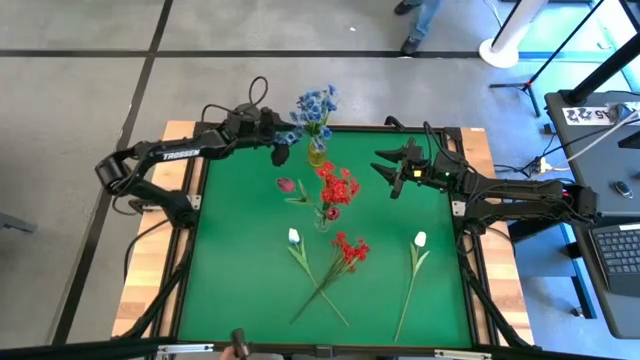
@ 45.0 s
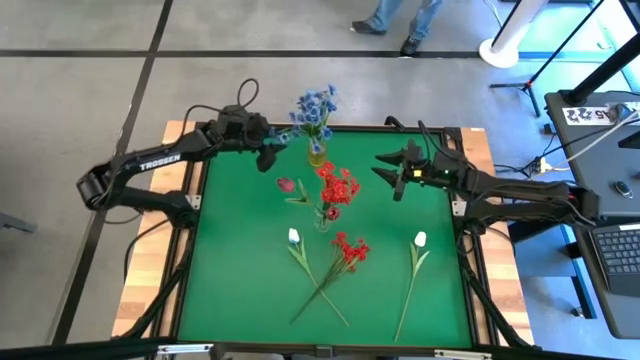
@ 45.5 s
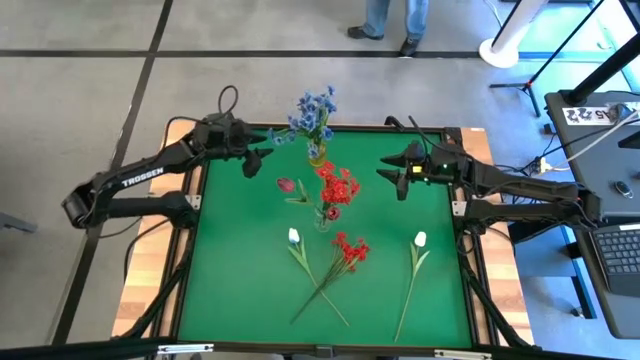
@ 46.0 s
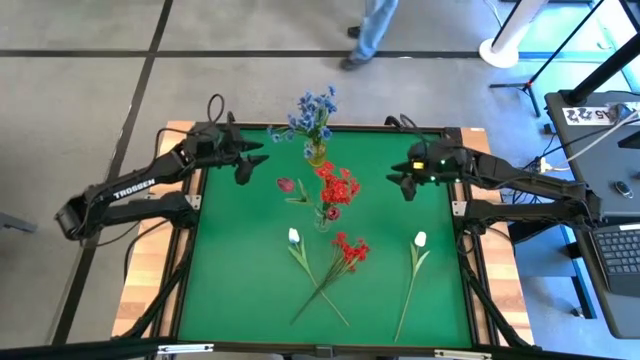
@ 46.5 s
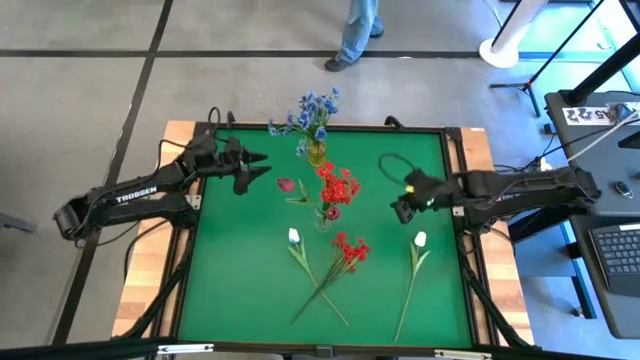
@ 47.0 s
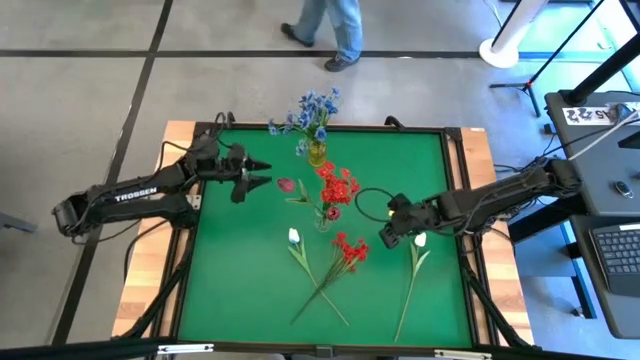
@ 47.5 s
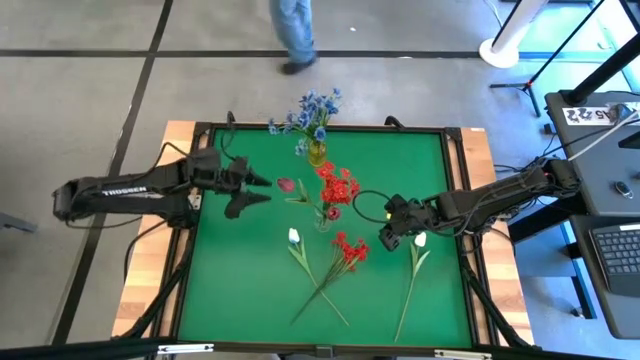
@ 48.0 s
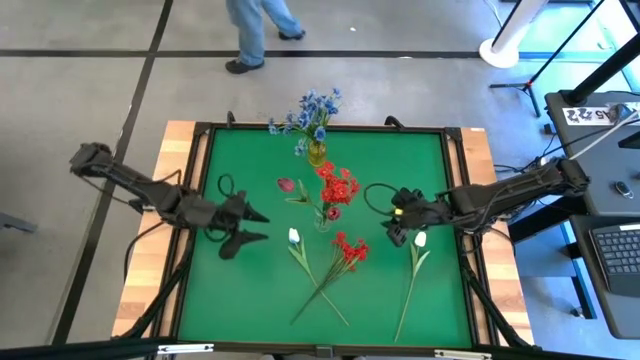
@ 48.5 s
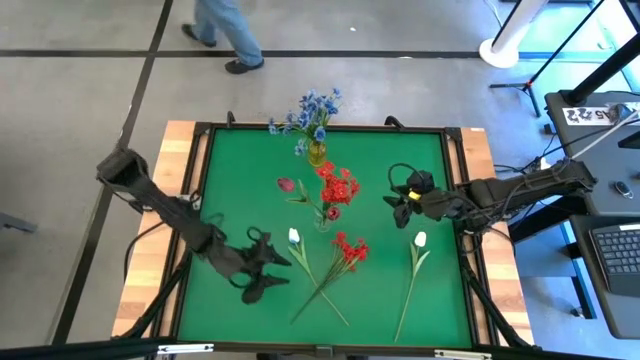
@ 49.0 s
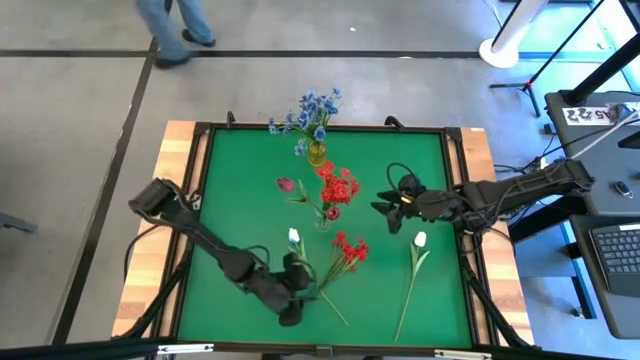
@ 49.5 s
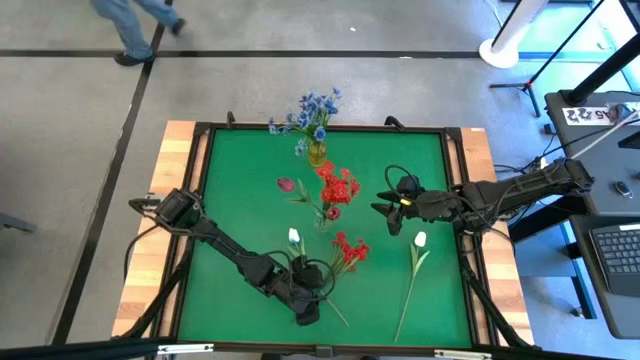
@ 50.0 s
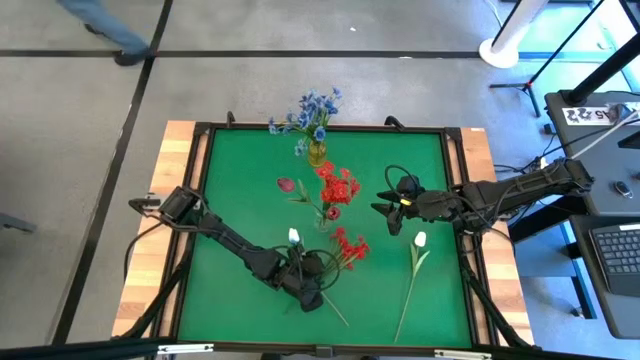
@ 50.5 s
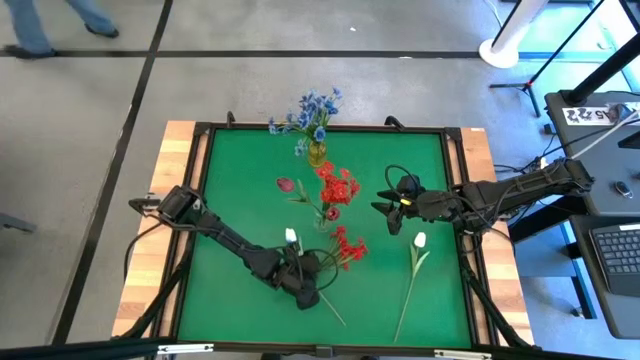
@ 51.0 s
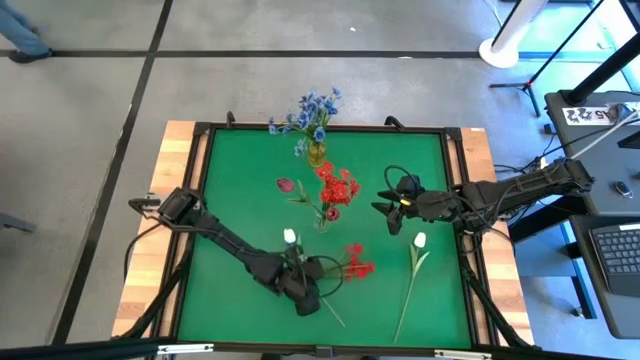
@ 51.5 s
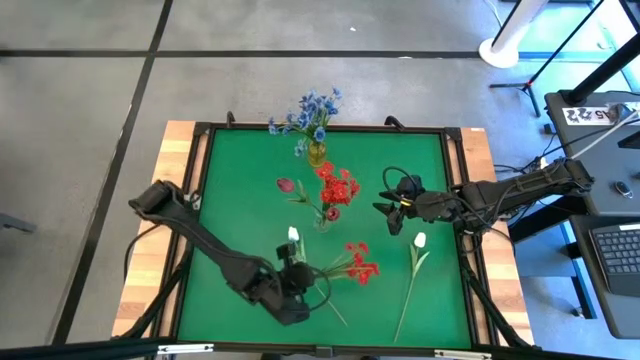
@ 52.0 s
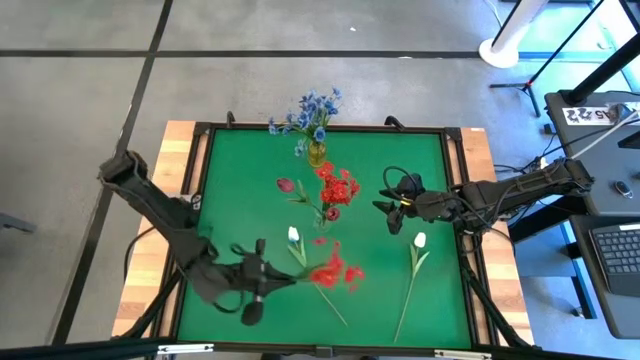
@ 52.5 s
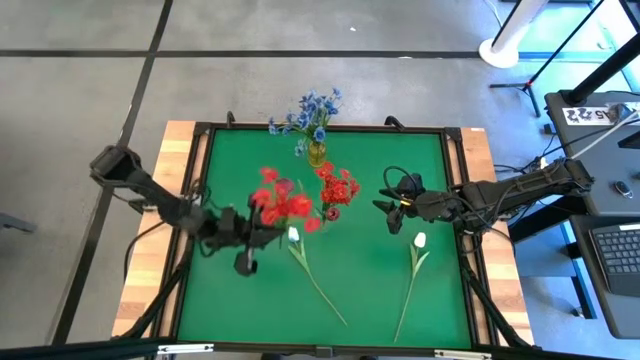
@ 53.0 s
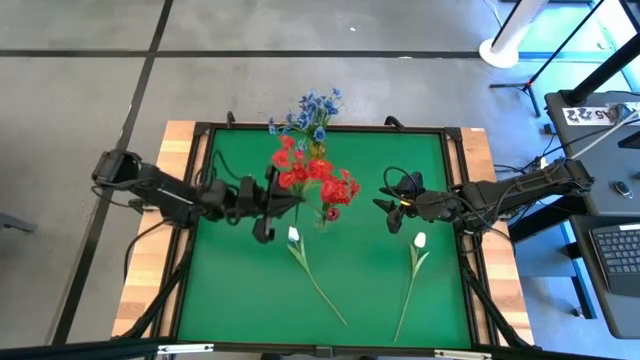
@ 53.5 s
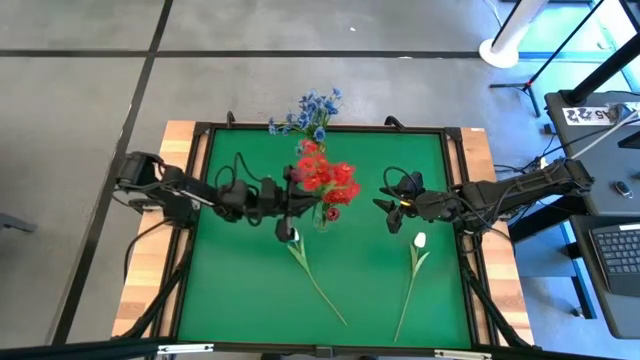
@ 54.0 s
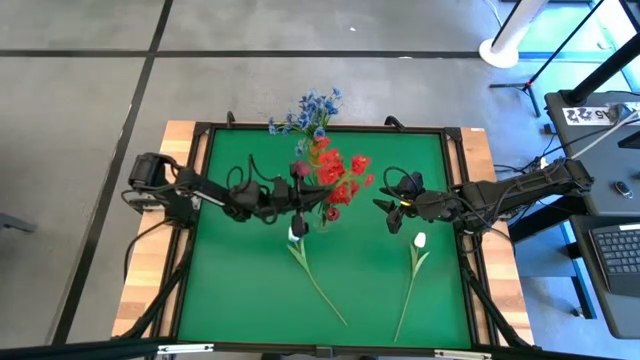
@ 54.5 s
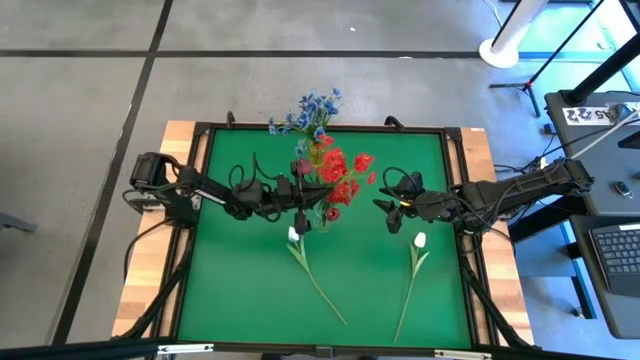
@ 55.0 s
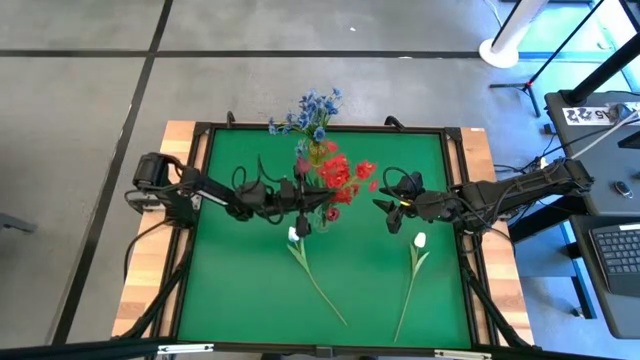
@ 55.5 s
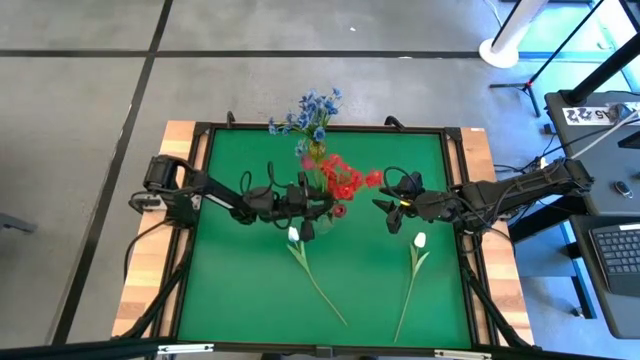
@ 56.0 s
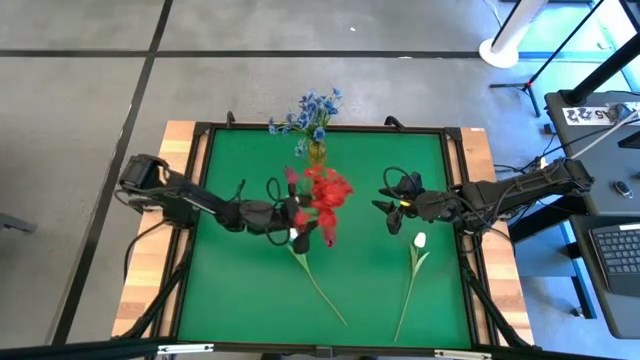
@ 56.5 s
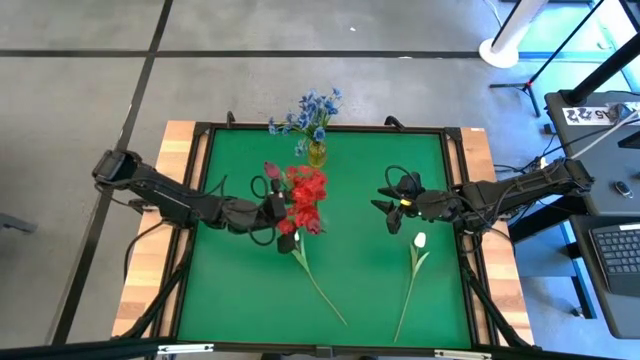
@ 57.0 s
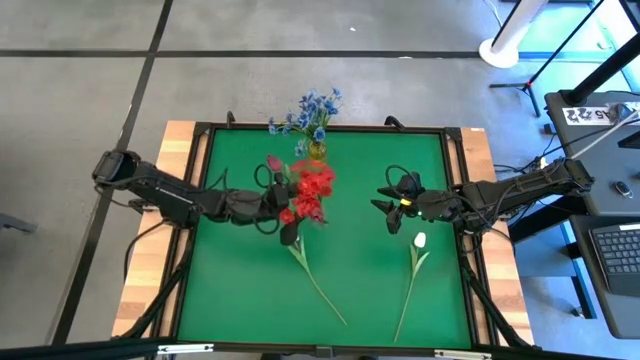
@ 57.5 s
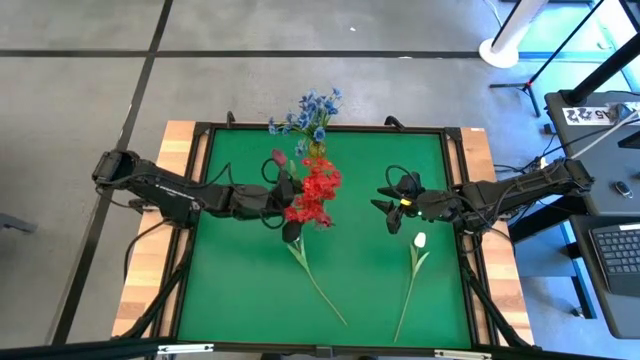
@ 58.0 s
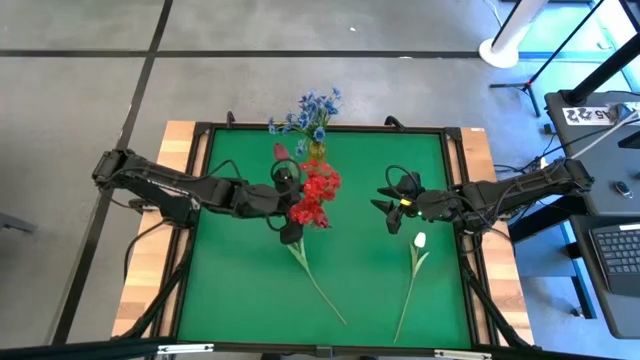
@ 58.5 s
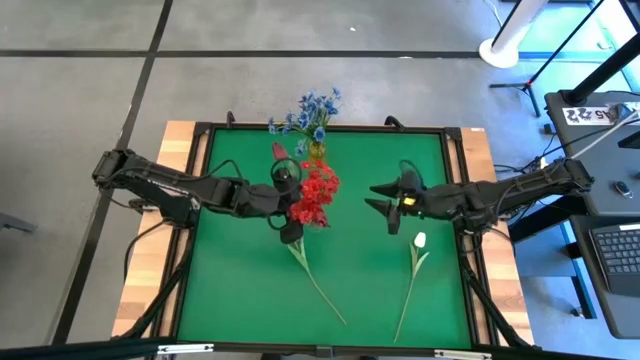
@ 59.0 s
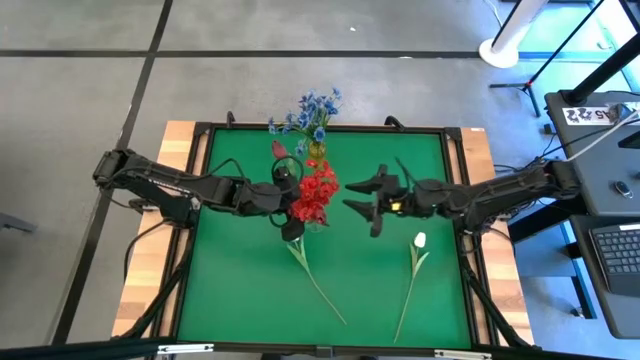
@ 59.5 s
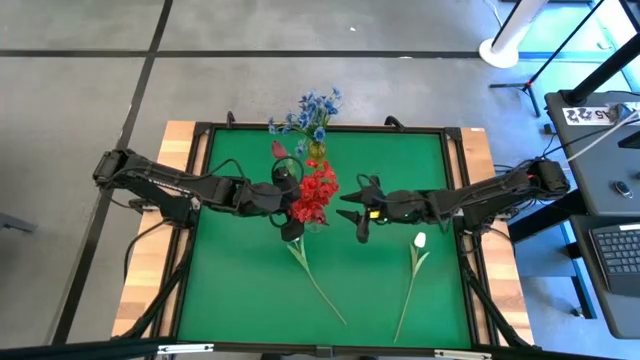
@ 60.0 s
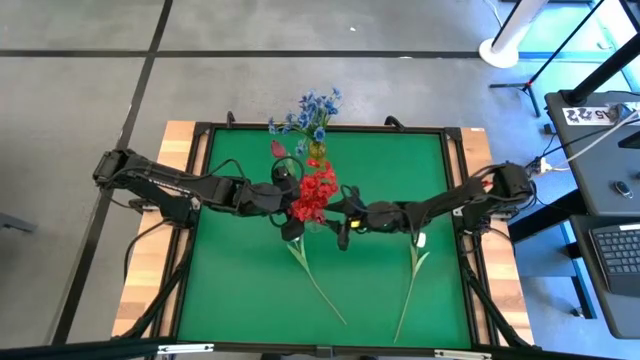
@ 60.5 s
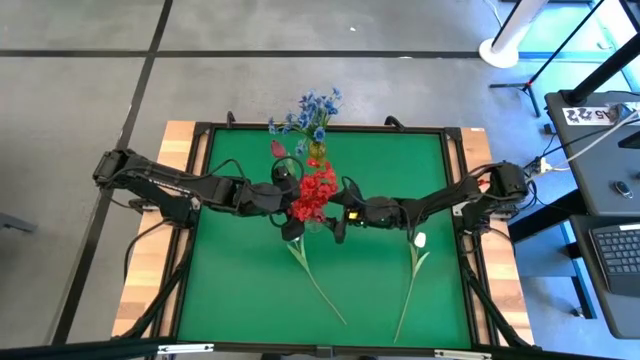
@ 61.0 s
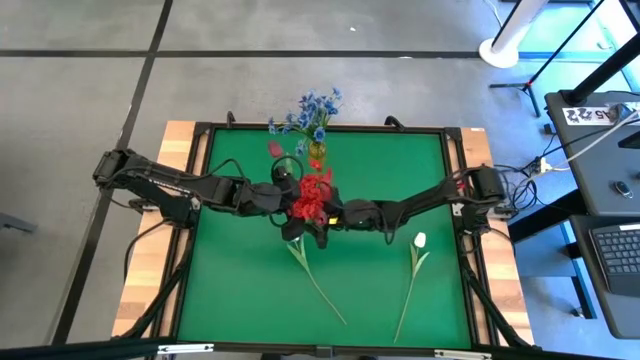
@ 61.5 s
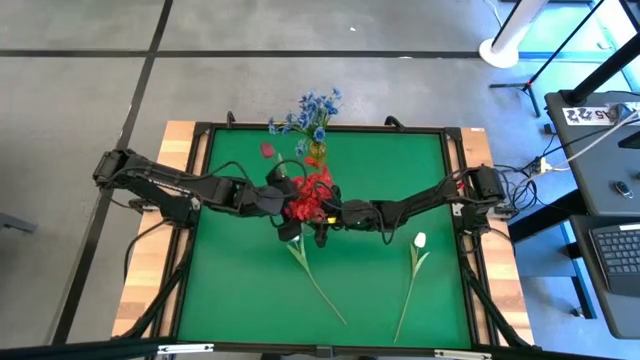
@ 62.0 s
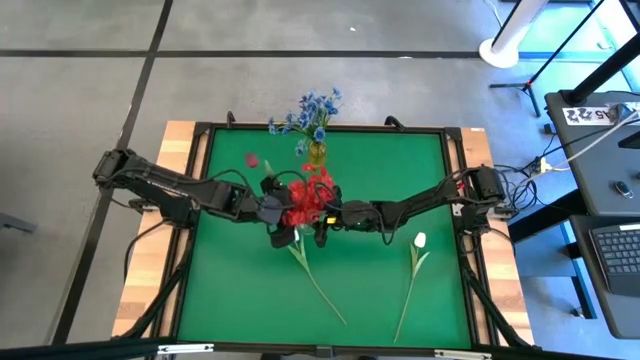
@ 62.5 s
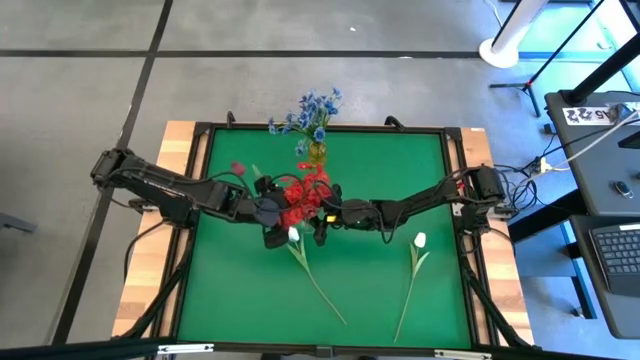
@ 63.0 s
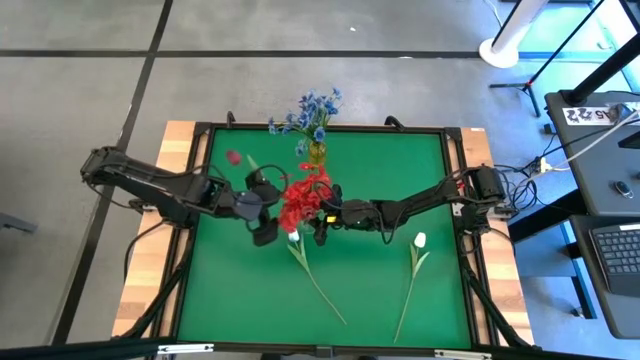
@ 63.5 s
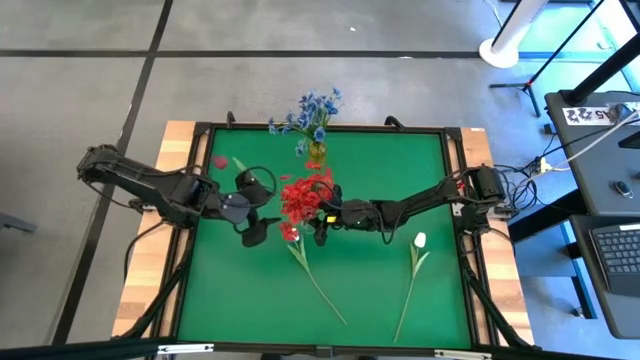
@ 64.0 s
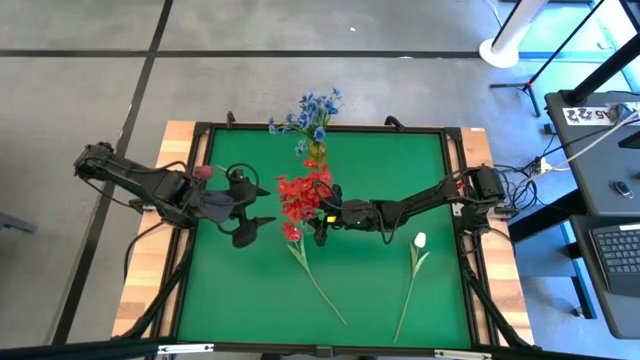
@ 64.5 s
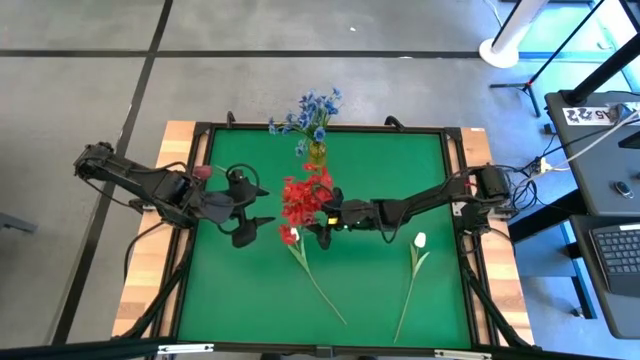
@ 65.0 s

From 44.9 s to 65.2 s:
Task: Sort flowers into vase by color
Put the red flowers into the transparent vase

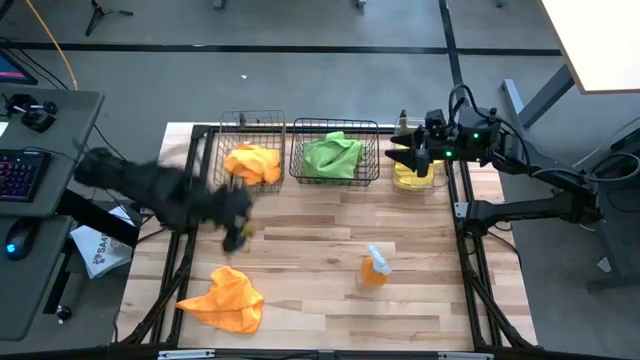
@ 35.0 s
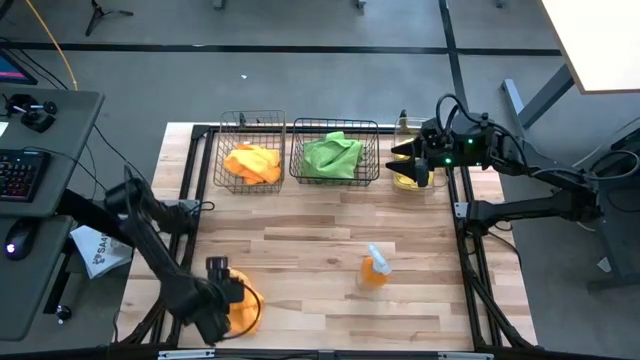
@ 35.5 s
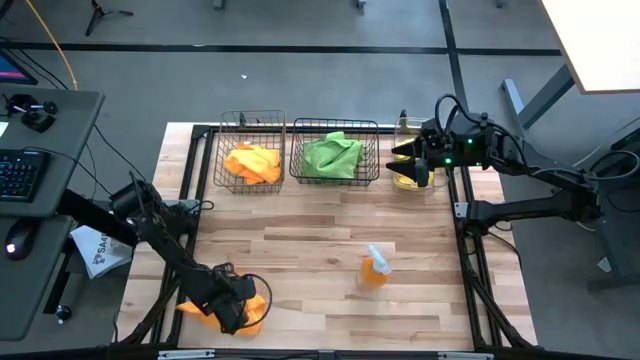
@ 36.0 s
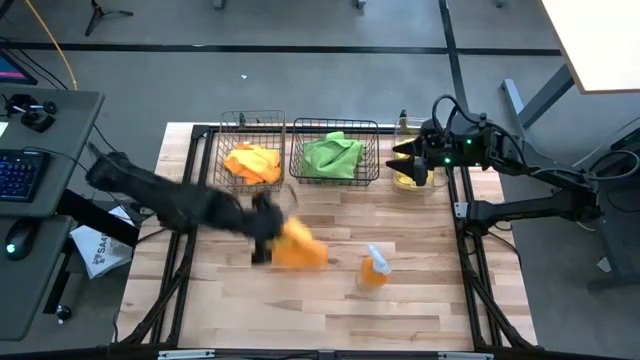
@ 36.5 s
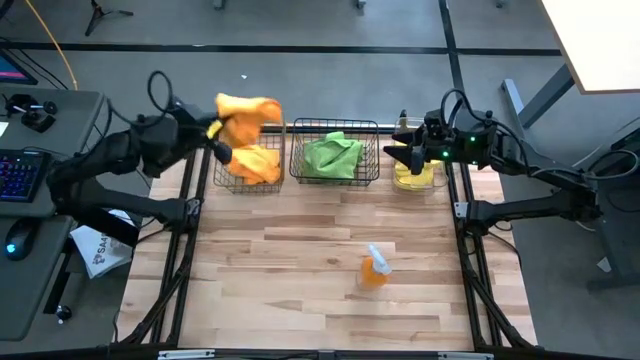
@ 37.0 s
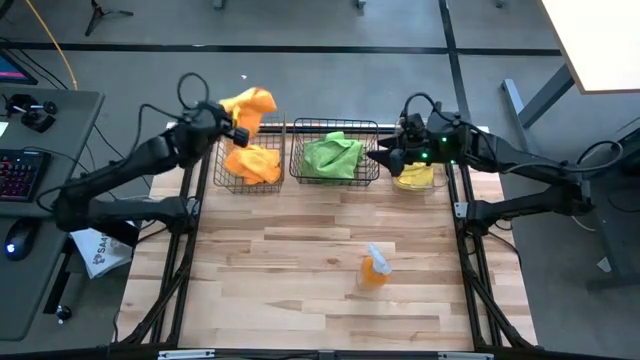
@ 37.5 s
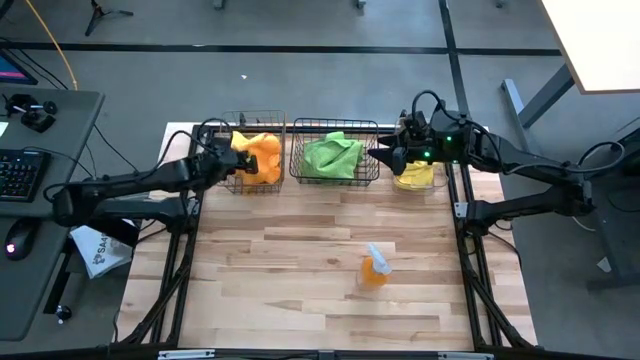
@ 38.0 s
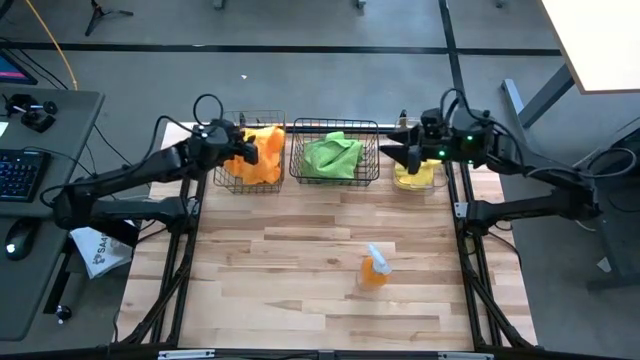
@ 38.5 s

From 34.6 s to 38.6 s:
Task: Sort microfiber towel by color & place in baskets
Put the orange microfiber towel into the gold wire basket
